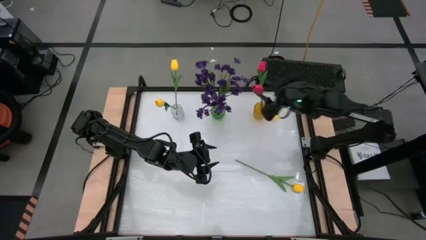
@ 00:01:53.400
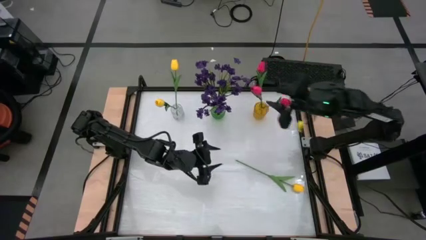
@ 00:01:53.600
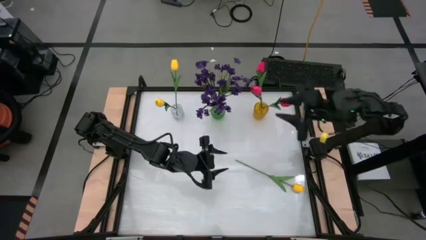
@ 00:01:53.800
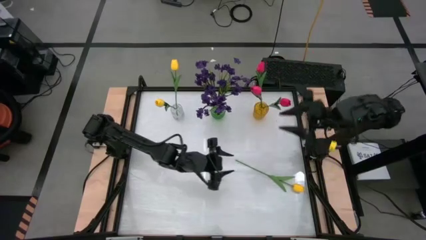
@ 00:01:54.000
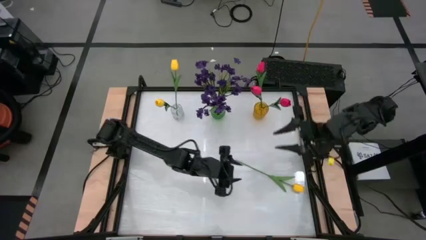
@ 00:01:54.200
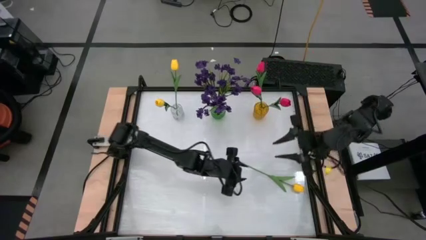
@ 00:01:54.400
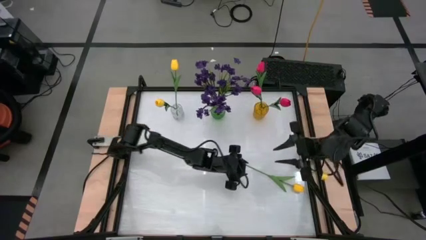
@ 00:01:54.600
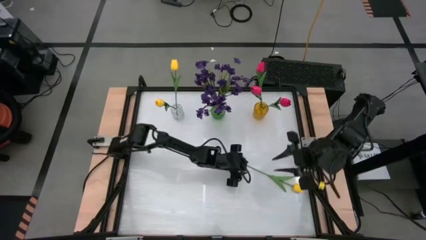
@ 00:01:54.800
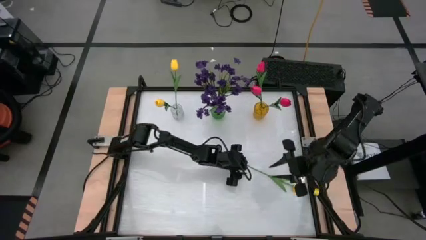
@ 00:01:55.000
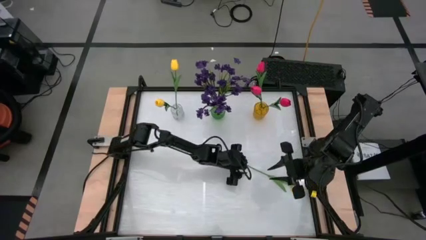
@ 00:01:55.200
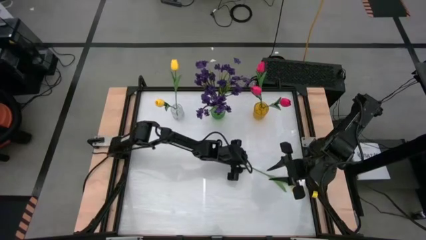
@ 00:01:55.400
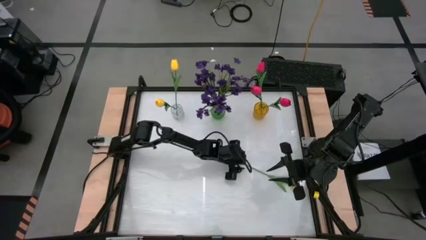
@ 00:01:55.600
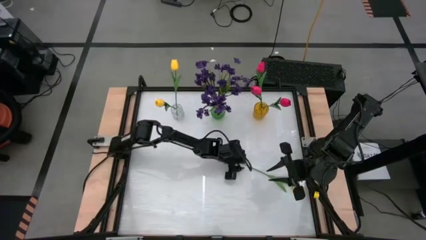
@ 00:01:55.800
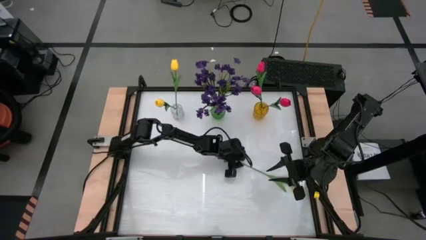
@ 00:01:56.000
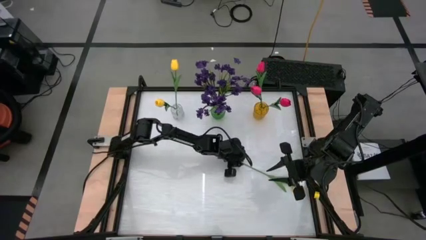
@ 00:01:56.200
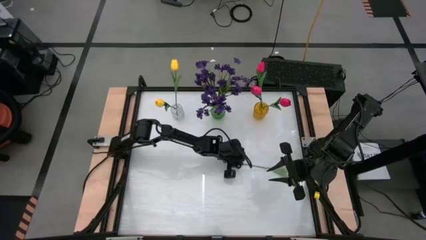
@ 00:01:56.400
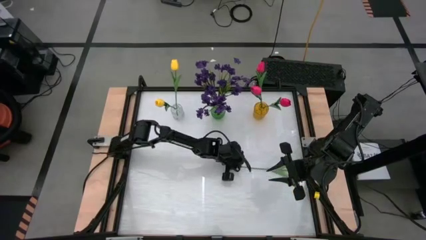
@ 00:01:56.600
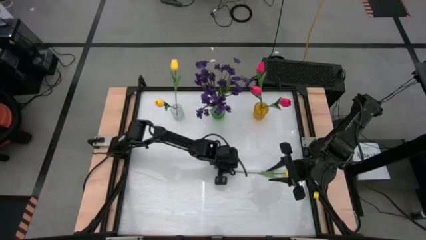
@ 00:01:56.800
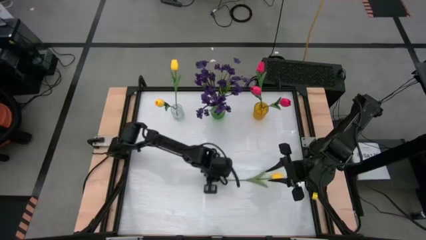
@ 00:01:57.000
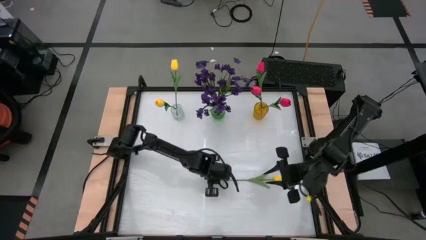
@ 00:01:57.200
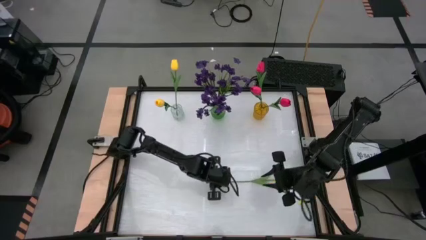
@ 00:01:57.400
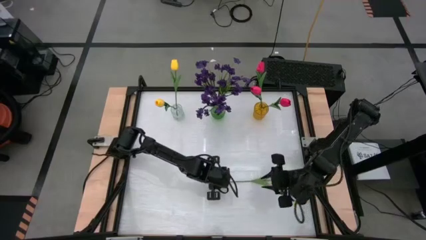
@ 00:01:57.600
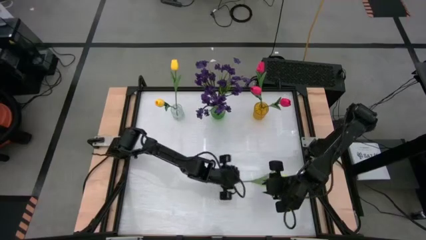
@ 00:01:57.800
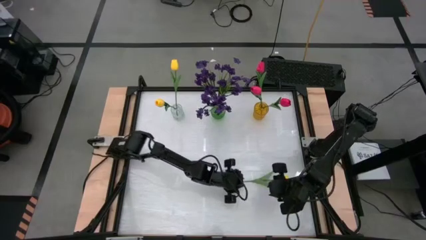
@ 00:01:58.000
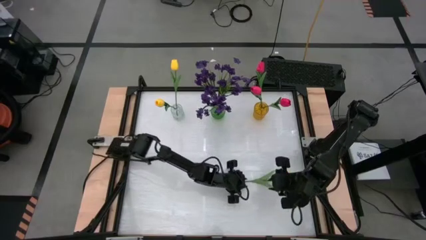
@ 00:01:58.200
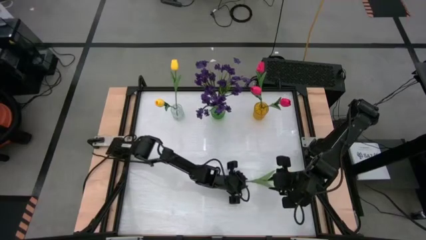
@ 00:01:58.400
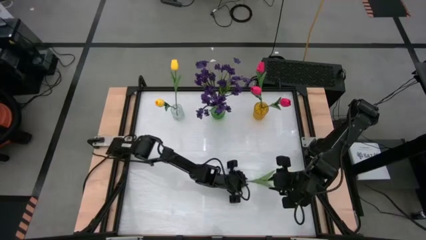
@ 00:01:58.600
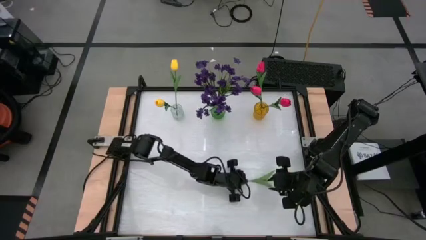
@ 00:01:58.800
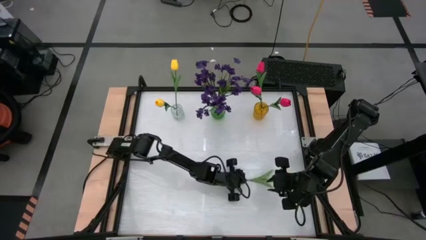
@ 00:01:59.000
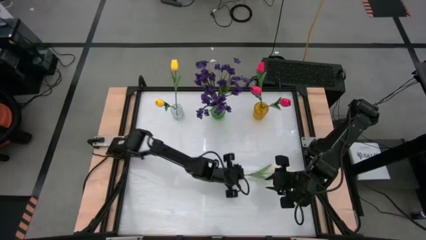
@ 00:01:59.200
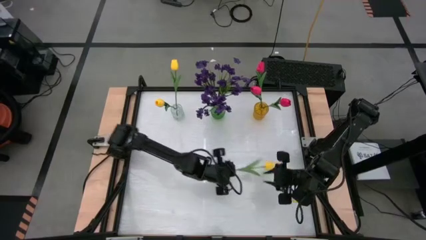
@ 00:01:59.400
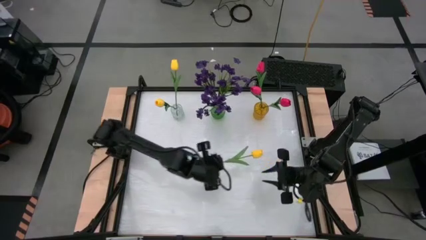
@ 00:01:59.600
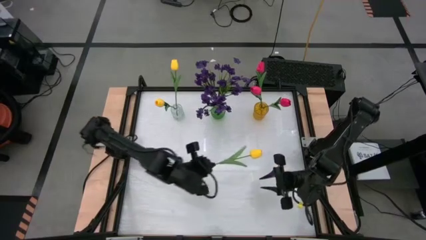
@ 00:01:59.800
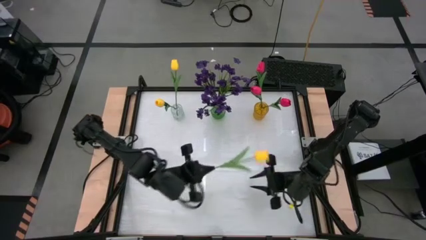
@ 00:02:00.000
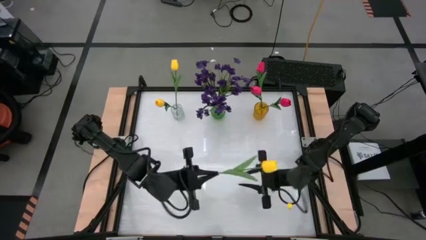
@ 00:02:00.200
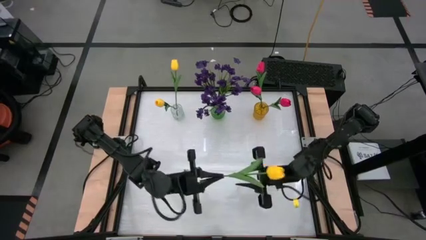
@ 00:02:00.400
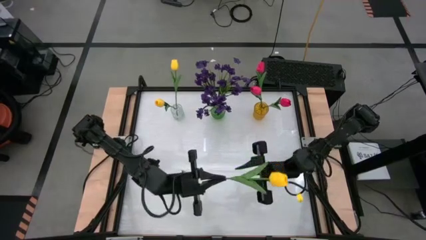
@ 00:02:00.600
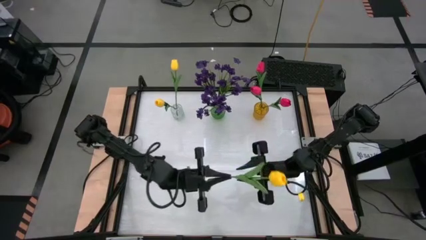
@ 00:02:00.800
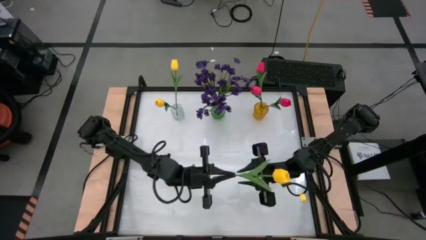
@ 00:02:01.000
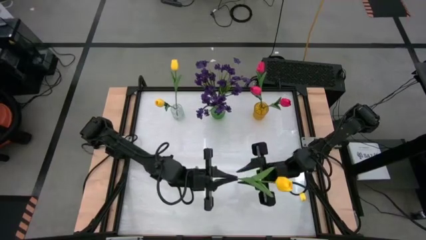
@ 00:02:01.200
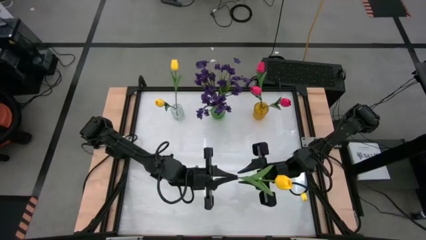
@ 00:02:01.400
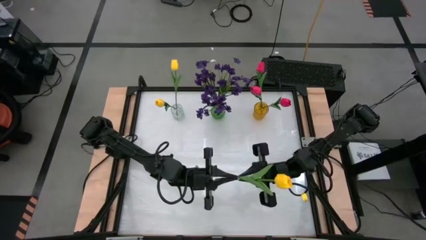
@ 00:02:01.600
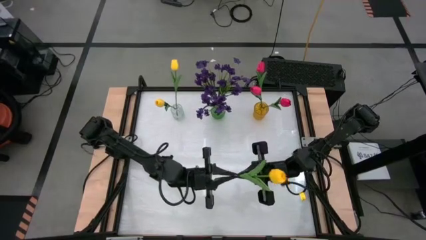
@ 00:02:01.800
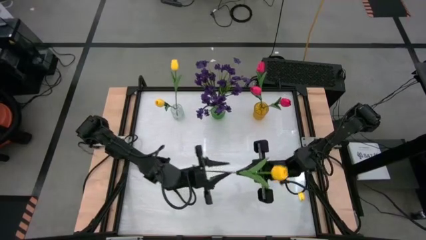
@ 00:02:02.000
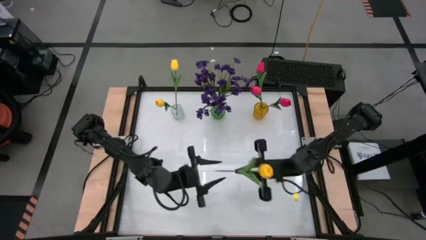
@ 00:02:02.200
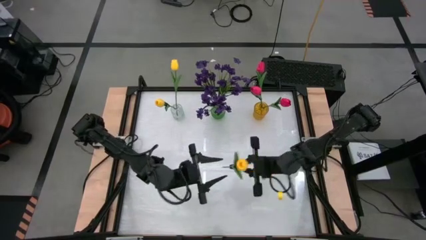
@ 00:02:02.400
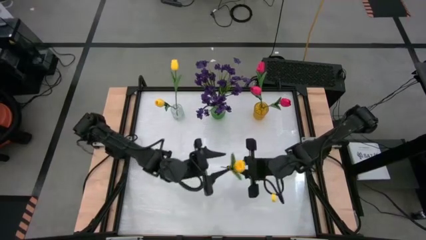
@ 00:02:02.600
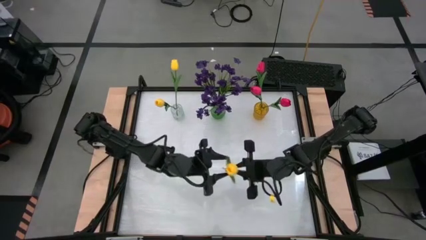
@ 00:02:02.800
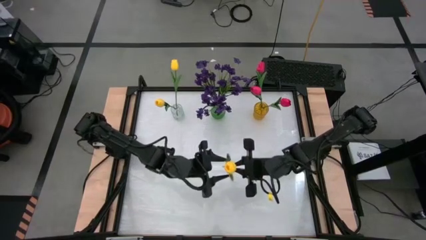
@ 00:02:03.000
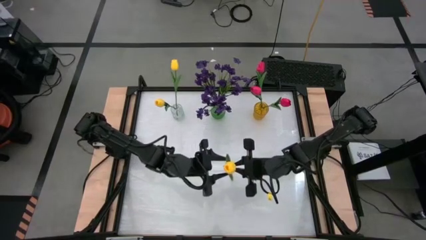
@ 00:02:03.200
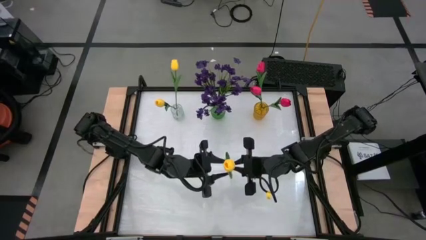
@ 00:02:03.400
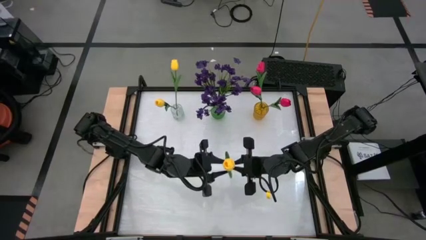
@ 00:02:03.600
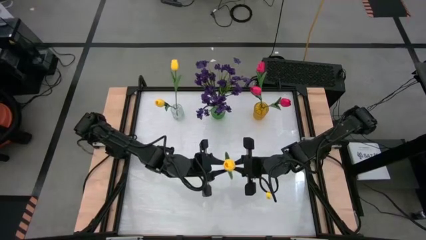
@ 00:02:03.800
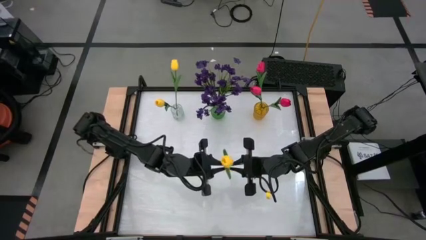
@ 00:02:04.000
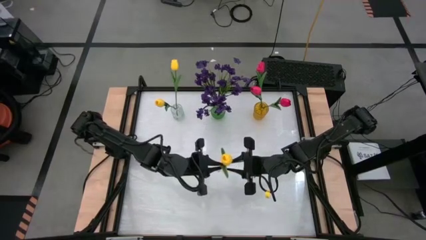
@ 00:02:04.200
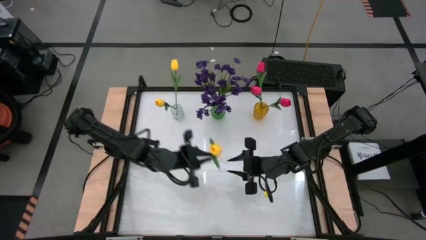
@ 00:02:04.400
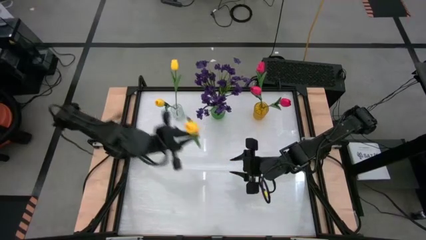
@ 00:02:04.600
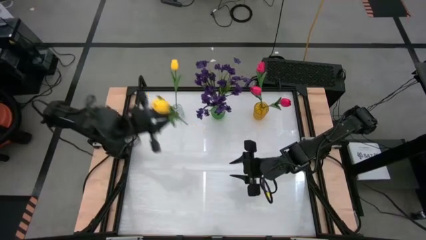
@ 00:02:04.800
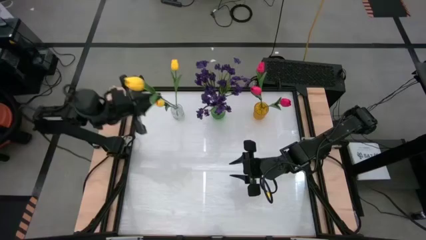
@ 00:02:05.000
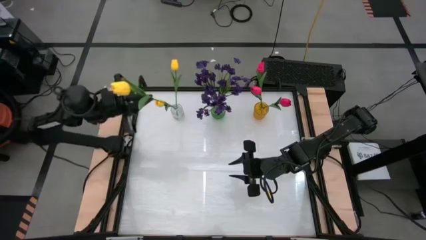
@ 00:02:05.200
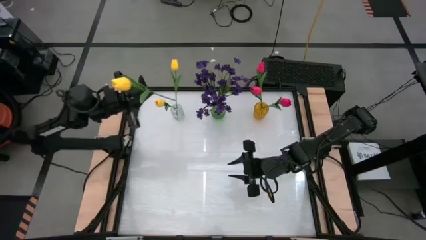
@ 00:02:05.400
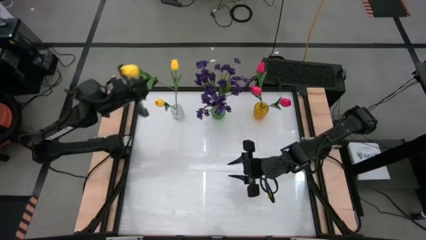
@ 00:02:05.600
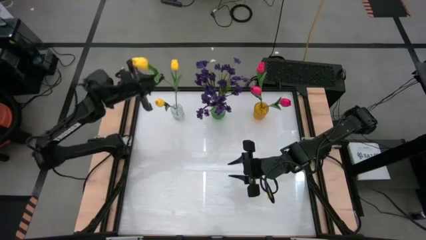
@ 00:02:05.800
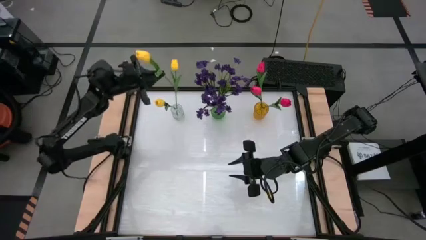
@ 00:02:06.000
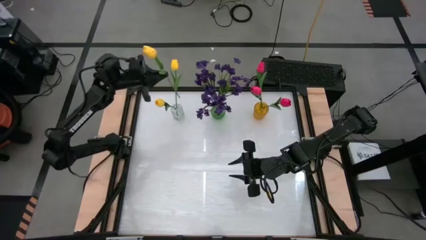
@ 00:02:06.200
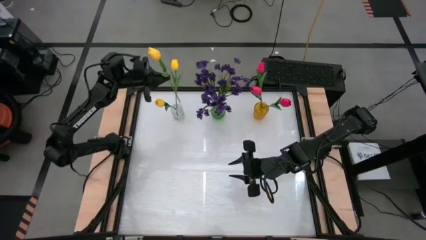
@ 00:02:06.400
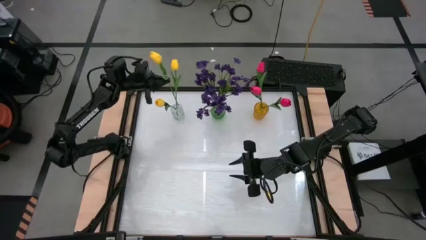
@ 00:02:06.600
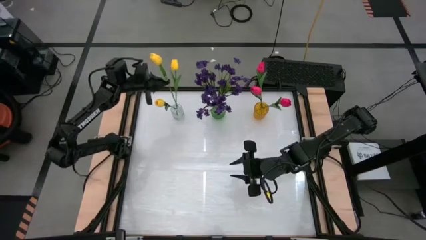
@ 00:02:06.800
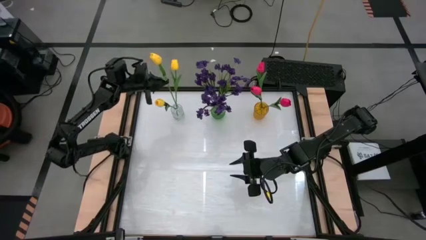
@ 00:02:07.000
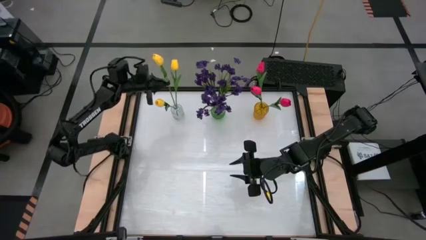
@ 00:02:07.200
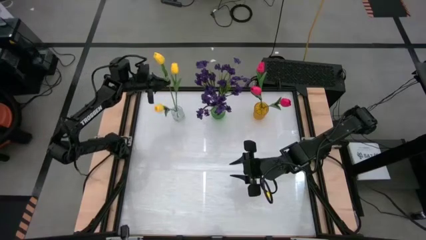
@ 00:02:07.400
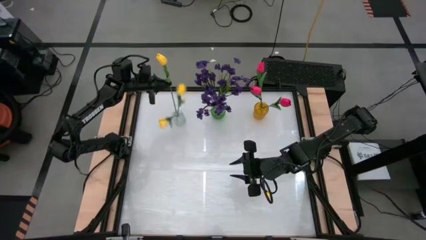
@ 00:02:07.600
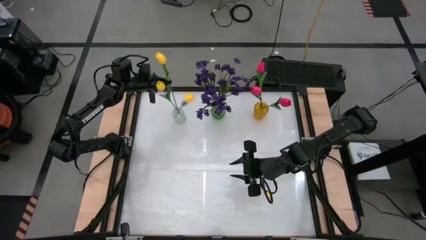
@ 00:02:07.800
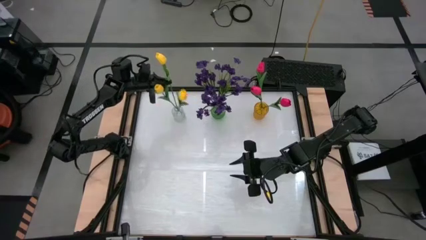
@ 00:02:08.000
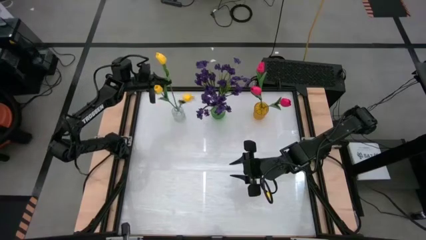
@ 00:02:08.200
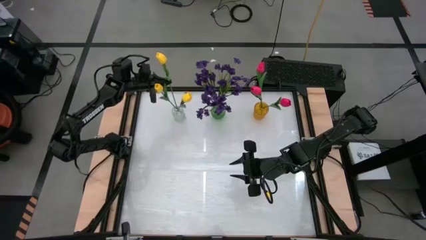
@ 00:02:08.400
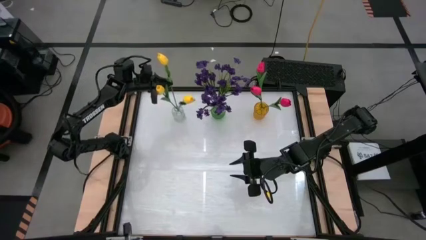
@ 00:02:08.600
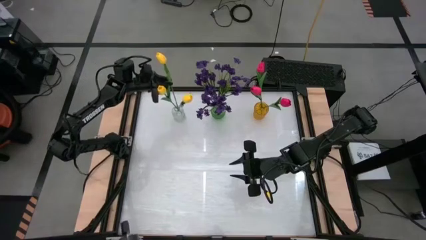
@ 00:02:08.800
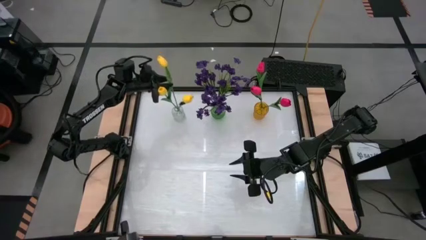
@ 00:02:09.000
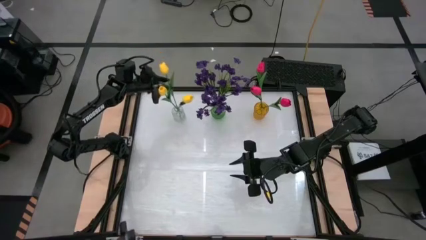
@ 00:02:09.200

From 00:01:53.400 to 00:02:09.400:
Task: Sort flowers into vase by color
Put the yellow flower into the transparent vase
